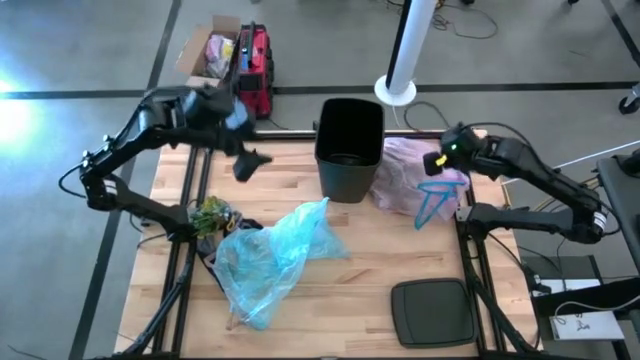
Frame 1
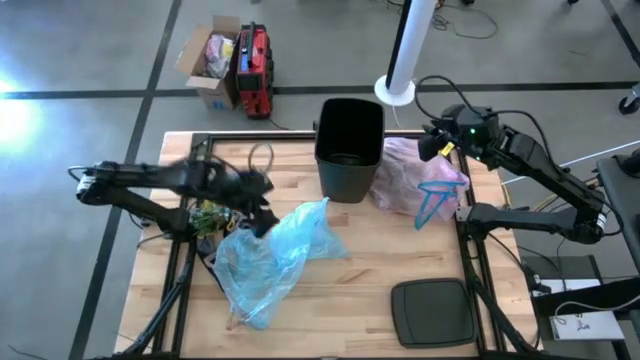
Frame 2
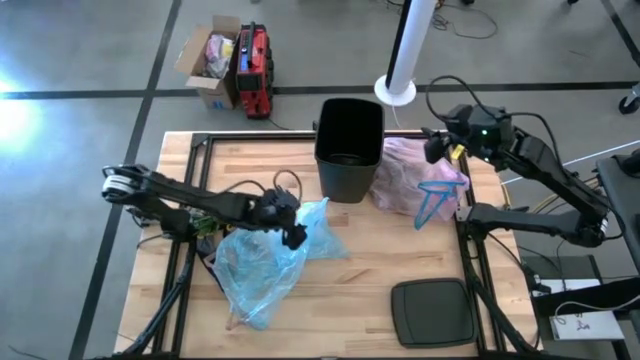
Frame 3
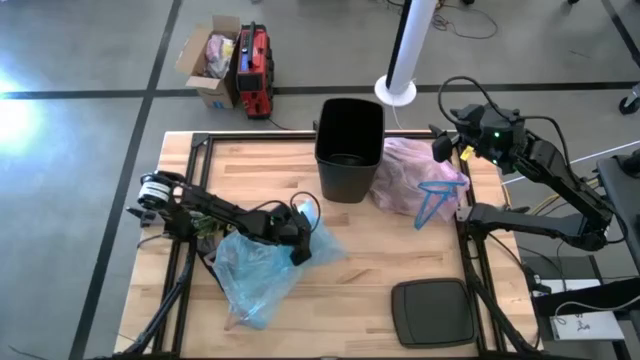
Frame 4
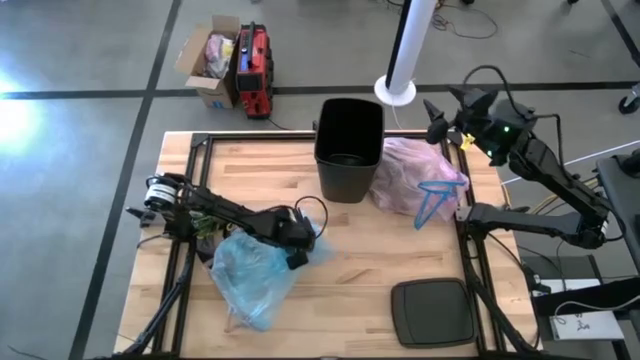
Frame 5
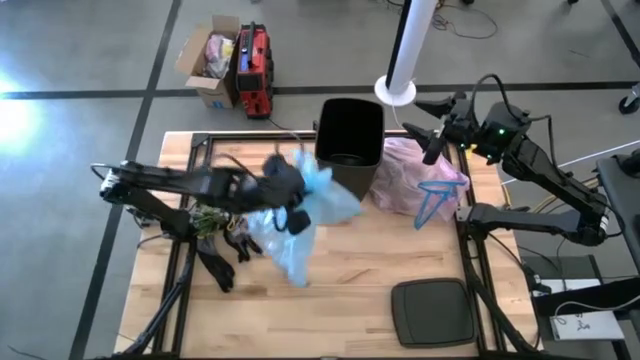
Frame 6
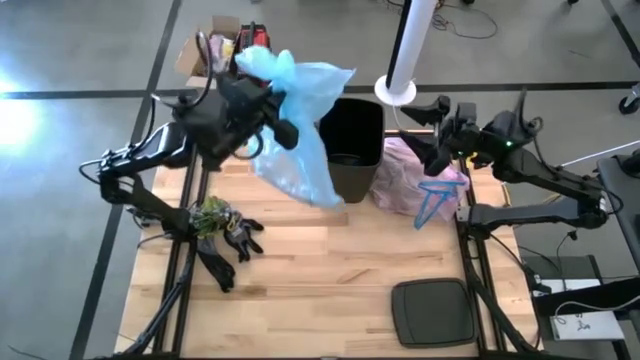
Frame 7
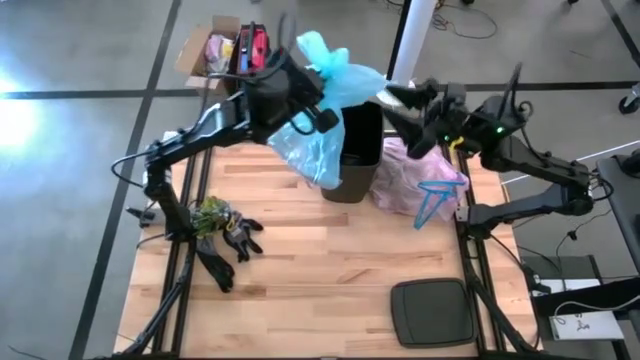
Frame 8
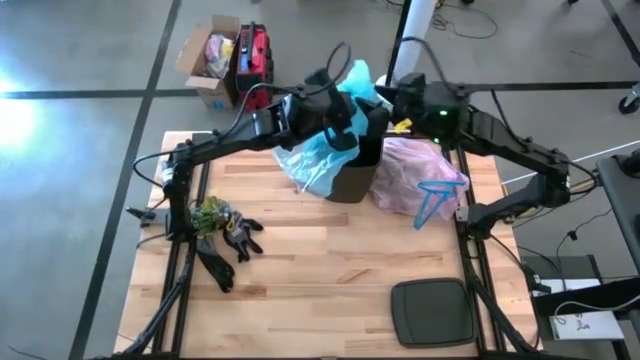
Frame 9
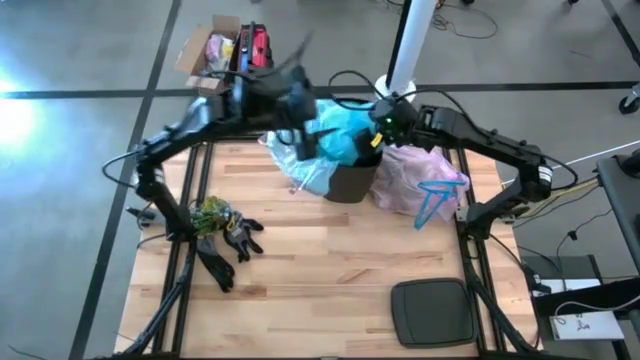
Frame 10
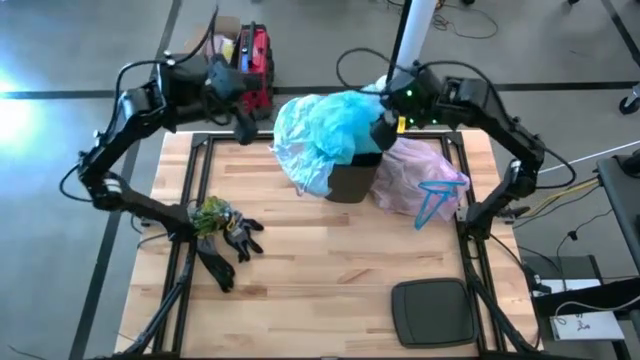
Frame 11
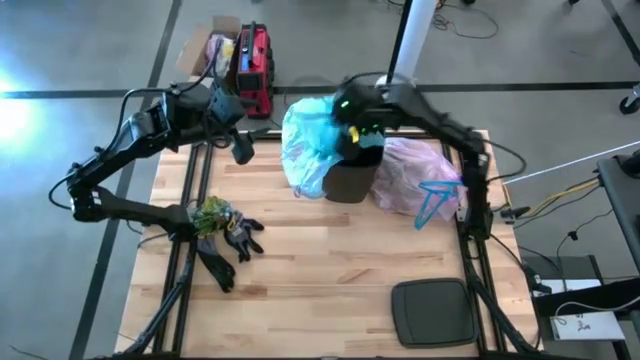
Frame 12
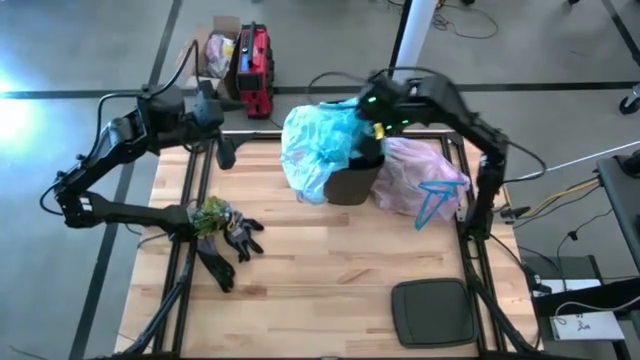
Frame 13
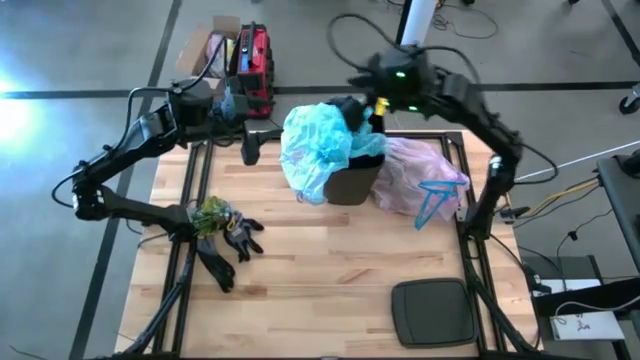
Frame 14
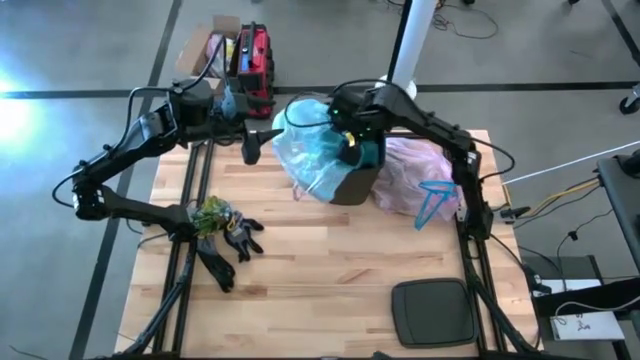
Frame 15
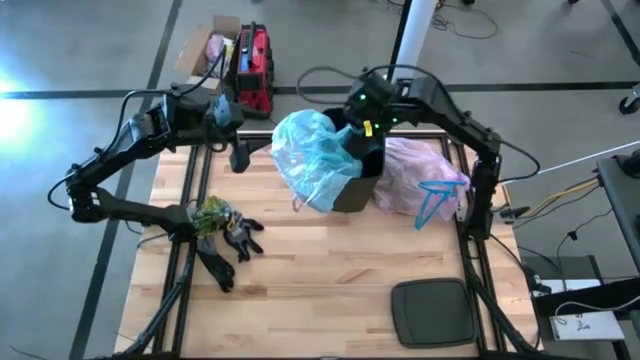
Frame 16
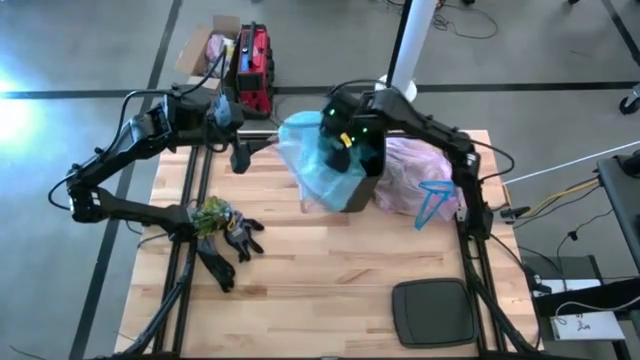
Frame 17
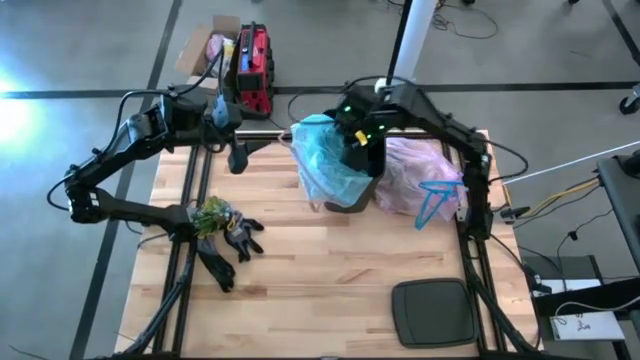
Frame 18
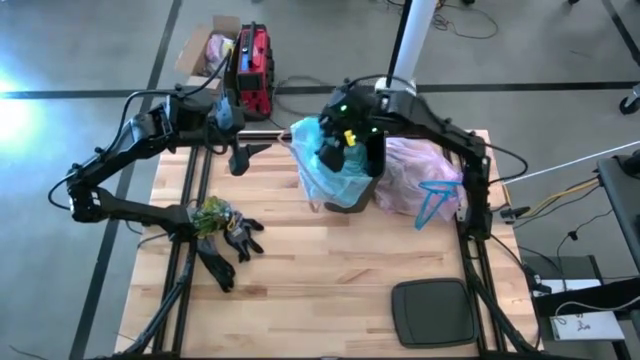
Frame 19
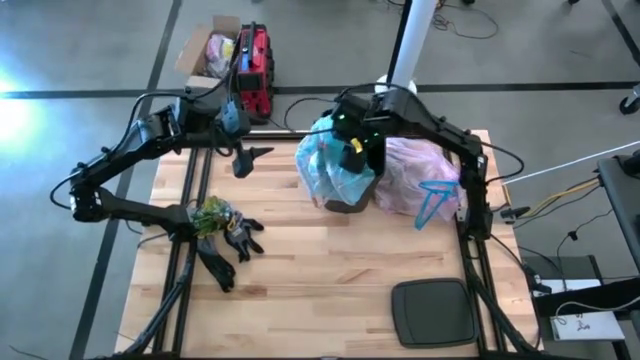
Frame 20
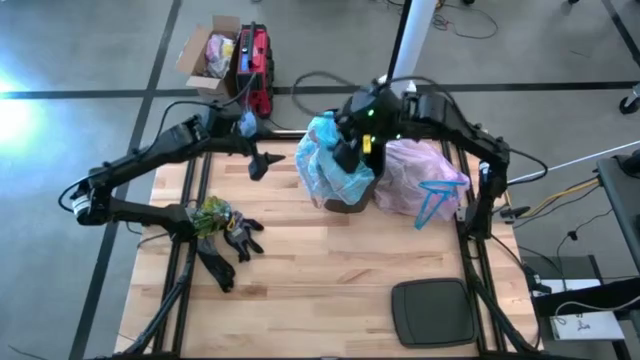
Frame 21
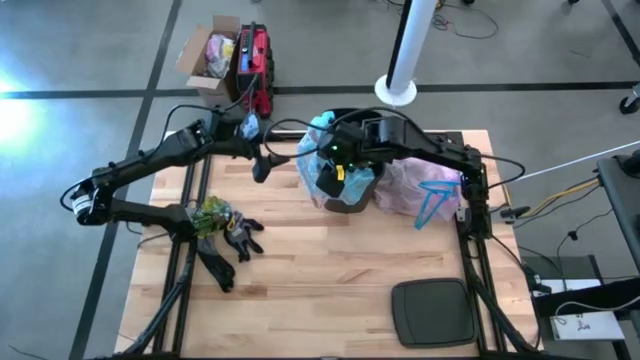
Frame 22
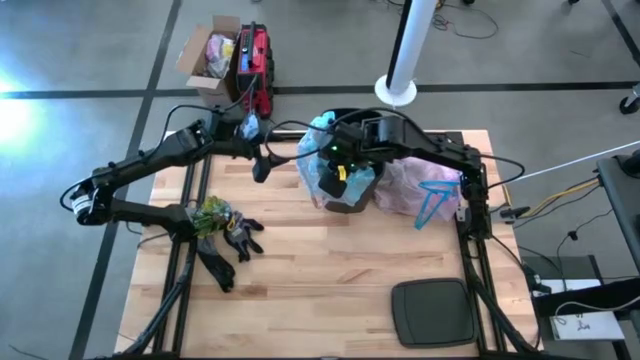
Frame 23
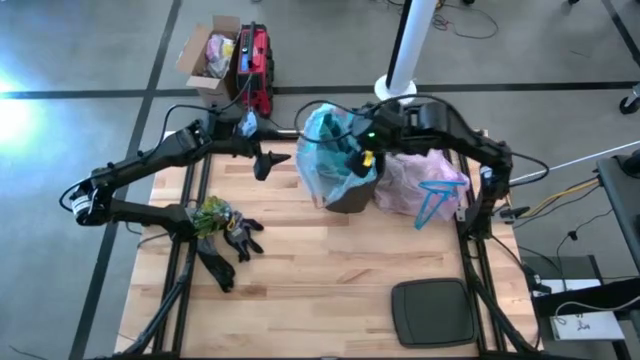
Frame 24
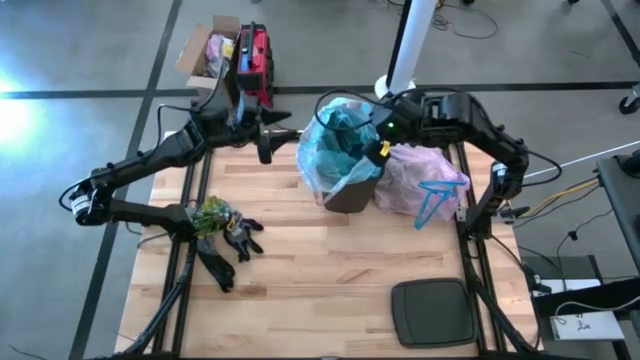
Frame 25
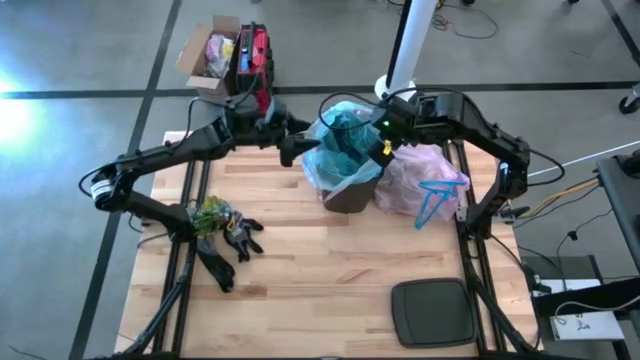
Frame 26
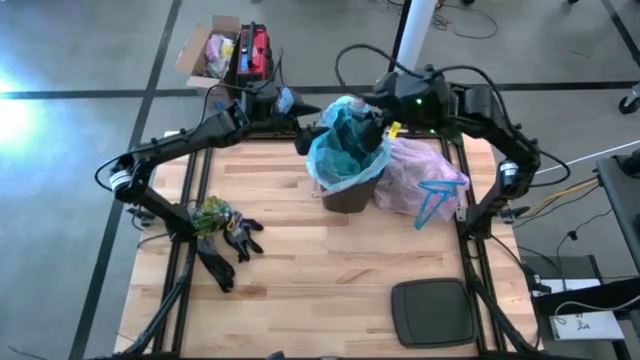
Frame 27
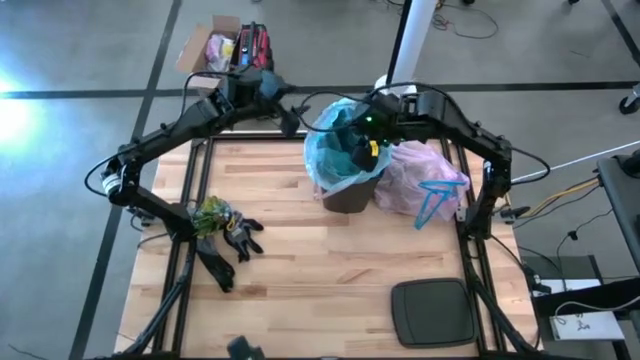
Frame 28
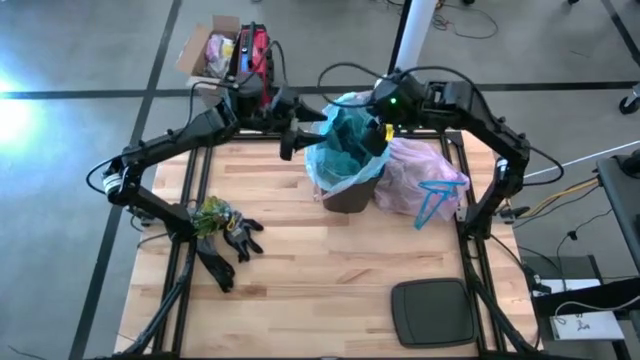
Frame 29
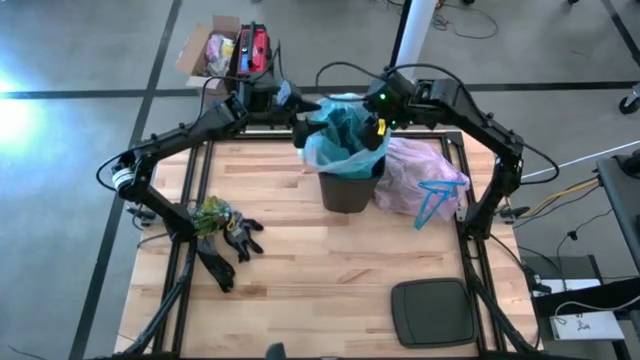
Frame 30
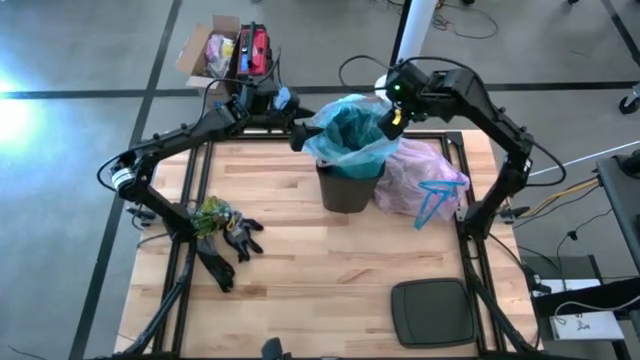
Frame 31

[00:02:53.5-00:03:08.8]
Task: place trash/remove bag and relplace
Insert the new blue trash bag into the trash bin

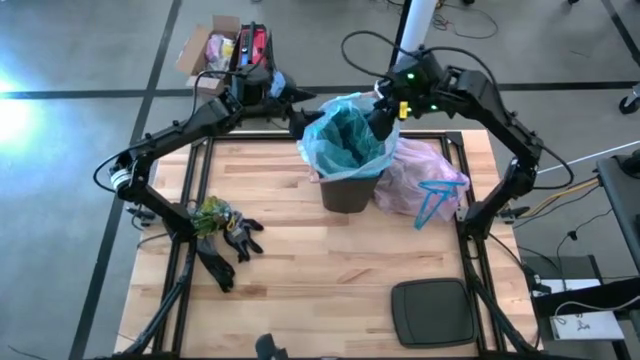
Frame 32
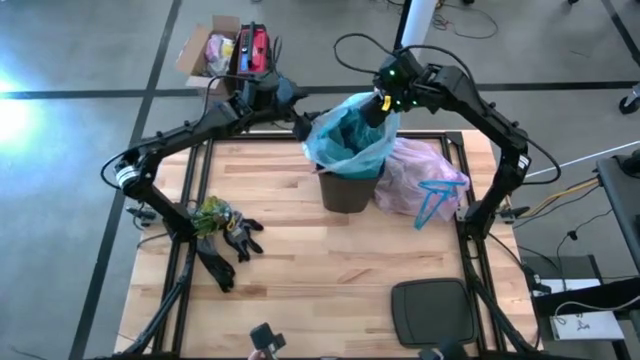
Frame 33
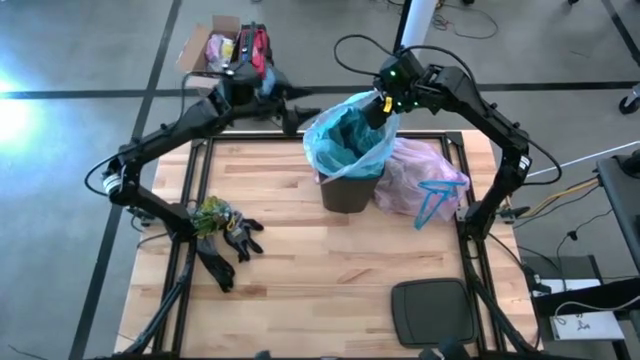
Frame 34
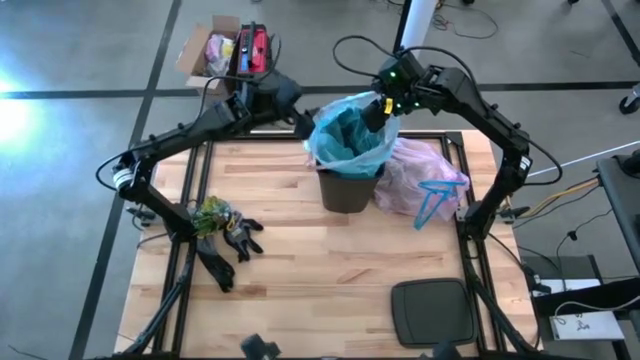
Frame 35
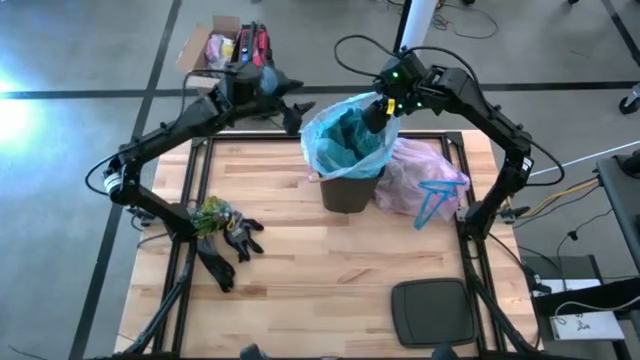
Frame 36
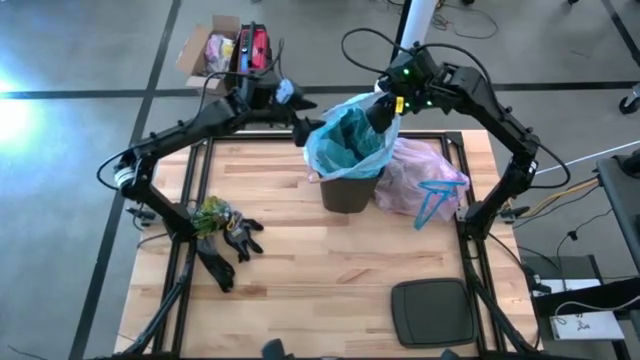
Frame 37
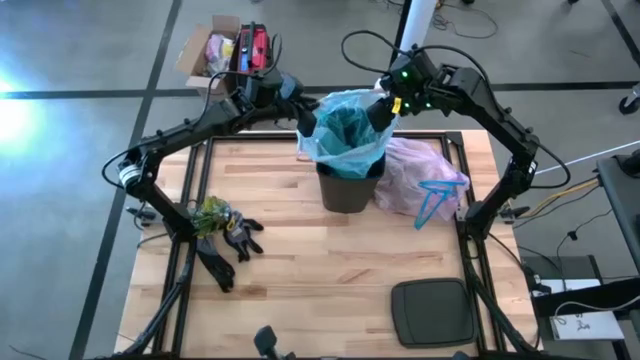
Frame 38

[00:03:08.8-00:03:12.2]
Insert the new blue trash bag into the trash bin

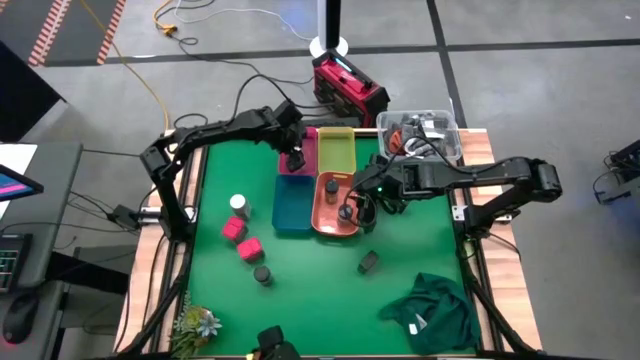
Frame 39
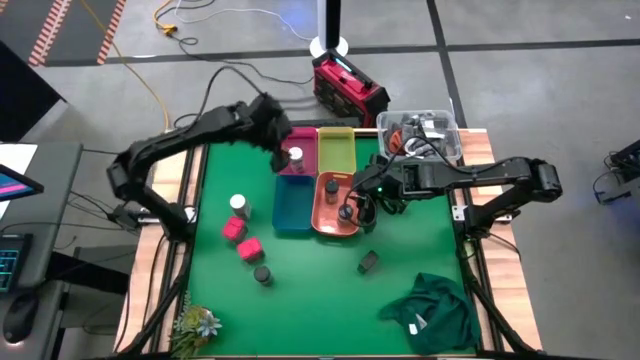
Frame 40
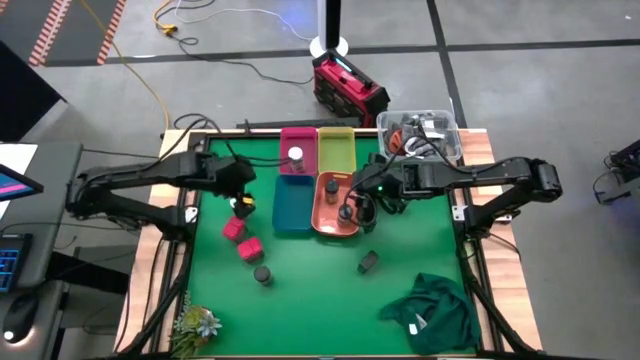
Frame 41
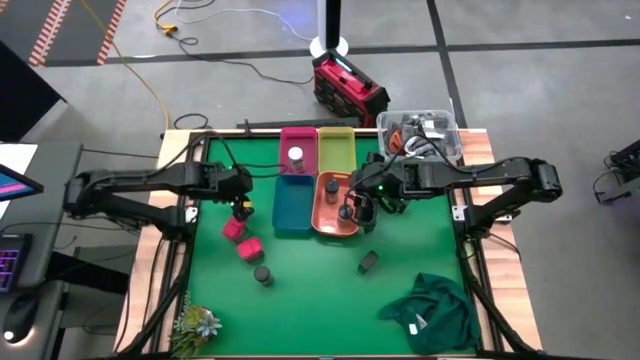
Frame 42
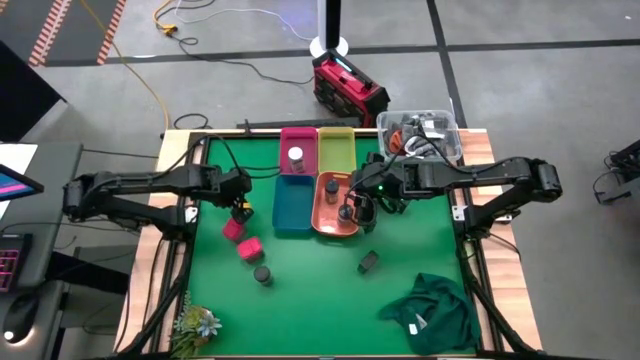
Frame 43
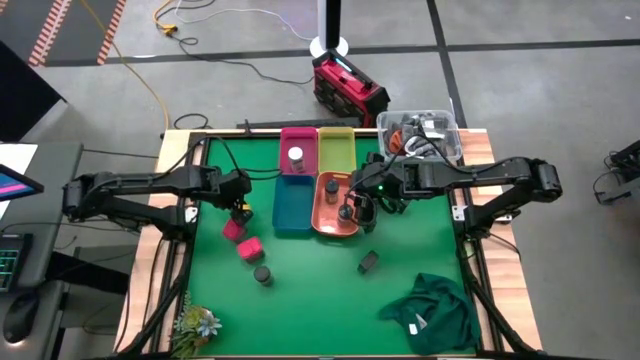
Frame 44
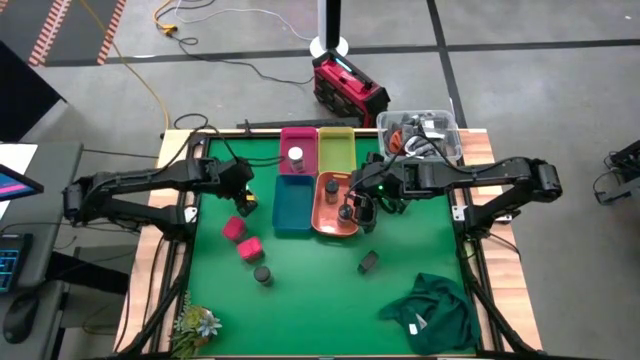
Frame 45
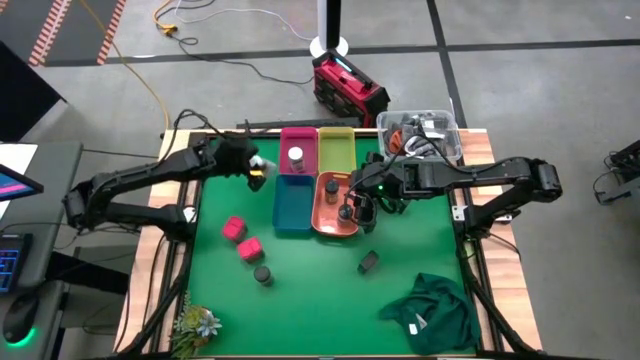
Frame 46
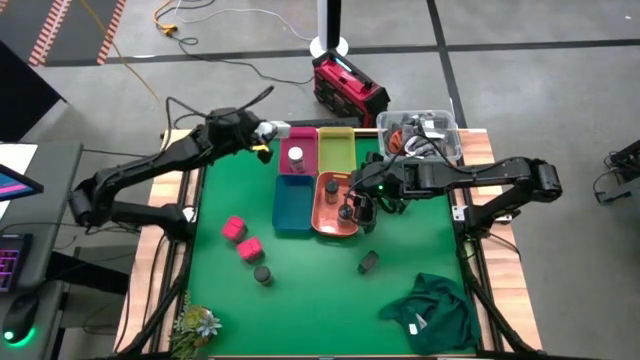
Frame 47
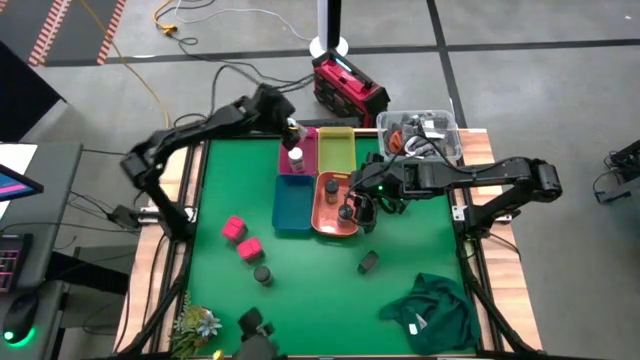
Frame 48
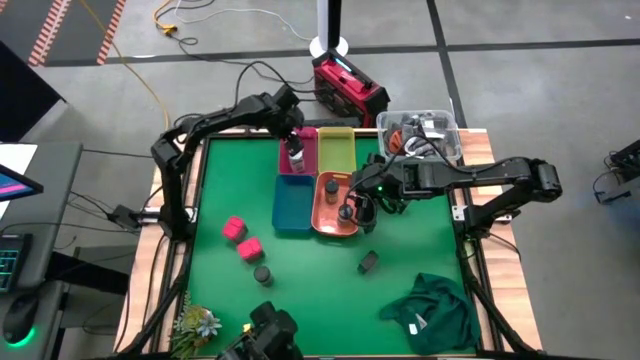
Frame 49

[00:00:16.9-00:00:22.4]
Task: Sort spices by type
Put the white seasoning bottle into the pink tray
